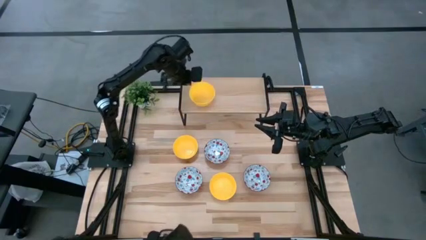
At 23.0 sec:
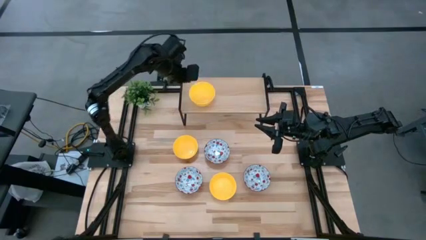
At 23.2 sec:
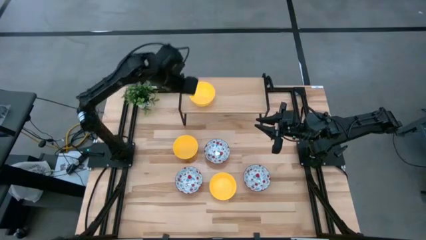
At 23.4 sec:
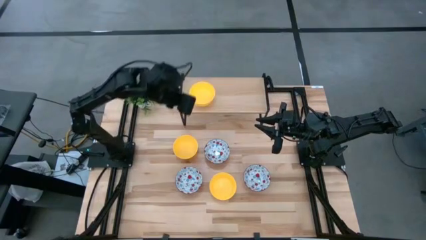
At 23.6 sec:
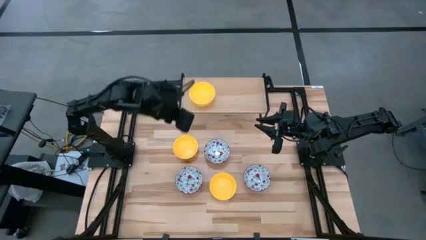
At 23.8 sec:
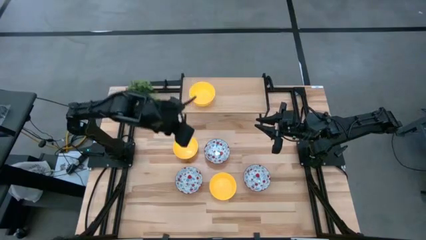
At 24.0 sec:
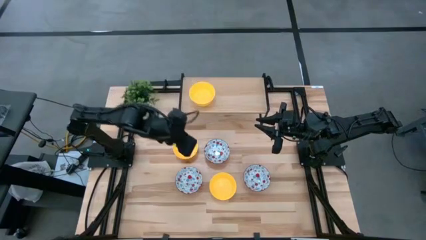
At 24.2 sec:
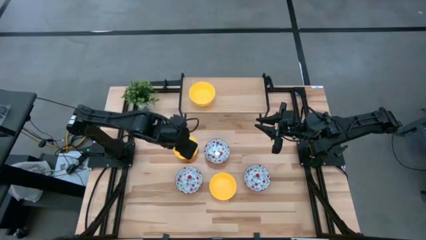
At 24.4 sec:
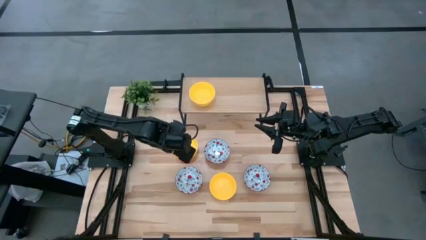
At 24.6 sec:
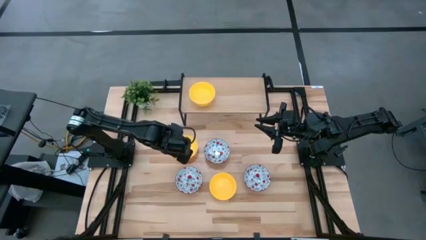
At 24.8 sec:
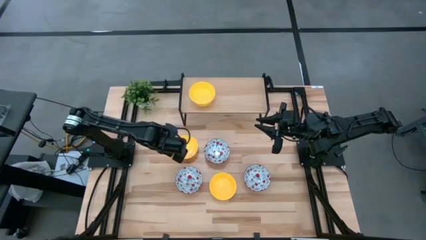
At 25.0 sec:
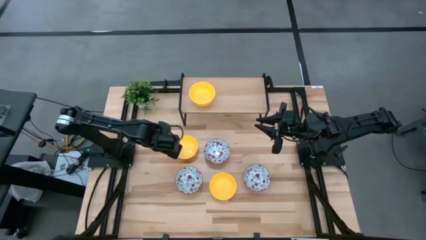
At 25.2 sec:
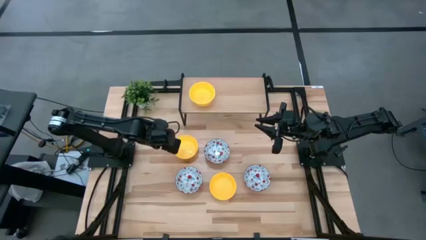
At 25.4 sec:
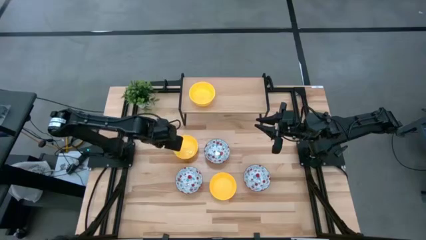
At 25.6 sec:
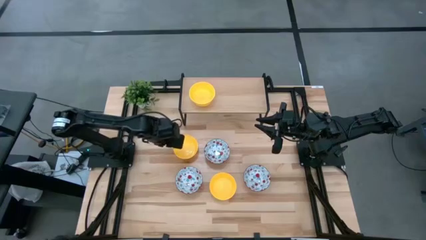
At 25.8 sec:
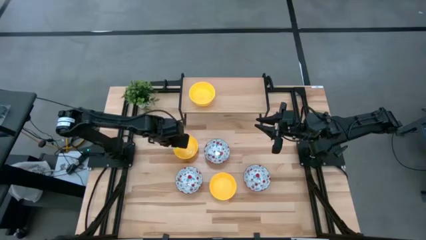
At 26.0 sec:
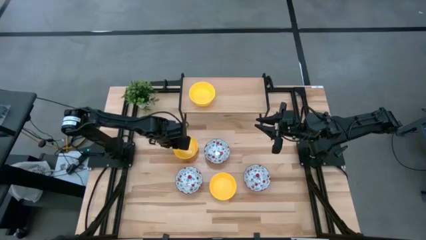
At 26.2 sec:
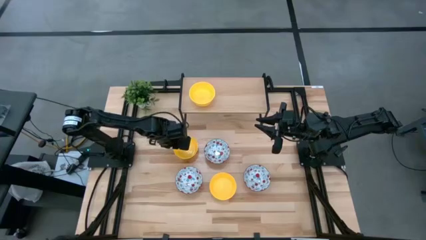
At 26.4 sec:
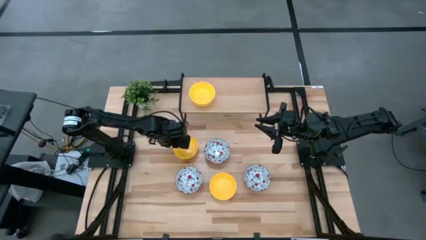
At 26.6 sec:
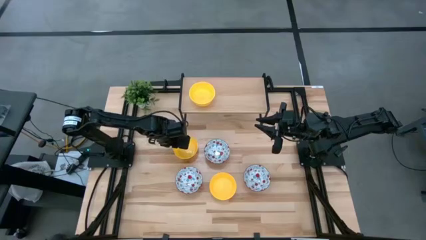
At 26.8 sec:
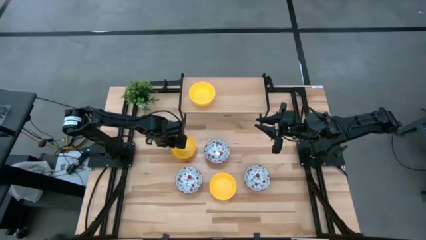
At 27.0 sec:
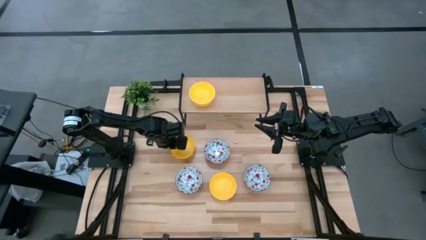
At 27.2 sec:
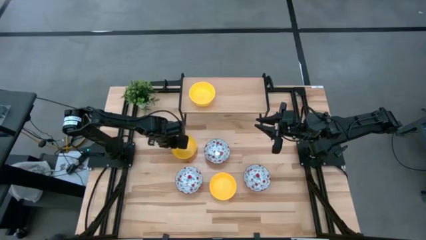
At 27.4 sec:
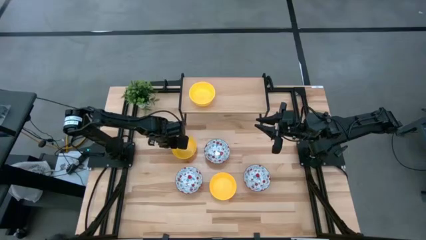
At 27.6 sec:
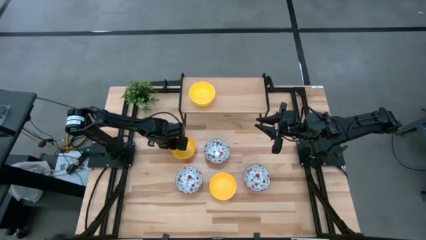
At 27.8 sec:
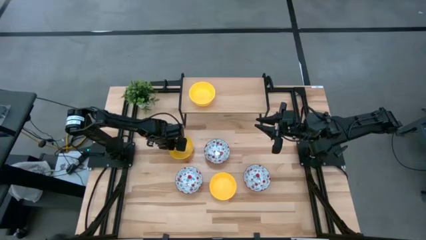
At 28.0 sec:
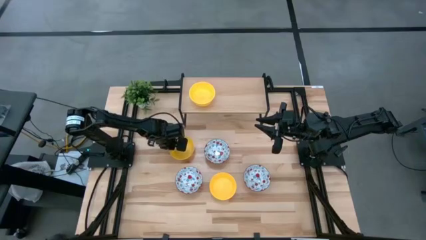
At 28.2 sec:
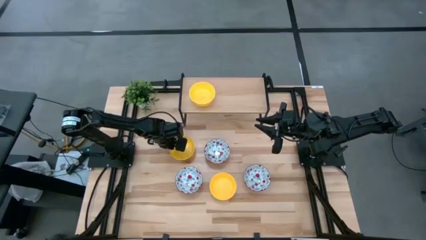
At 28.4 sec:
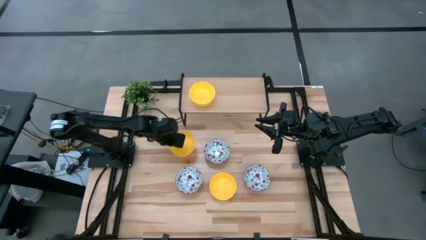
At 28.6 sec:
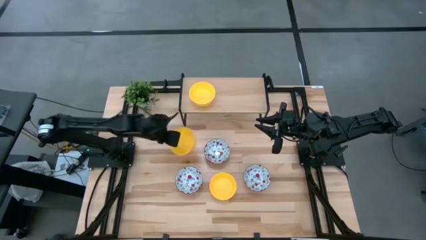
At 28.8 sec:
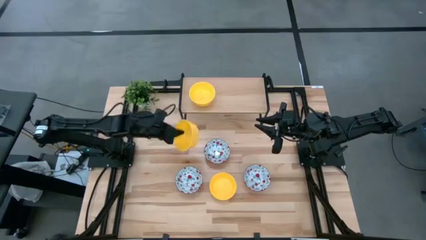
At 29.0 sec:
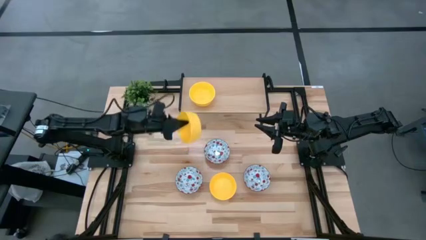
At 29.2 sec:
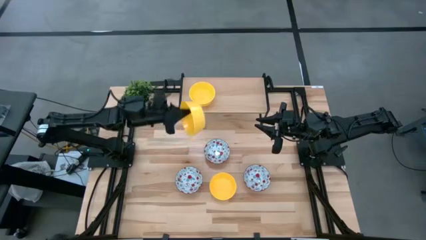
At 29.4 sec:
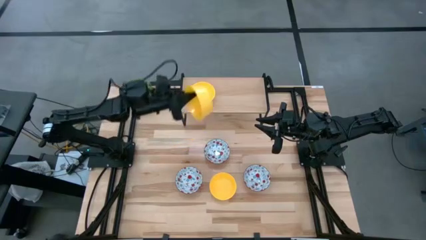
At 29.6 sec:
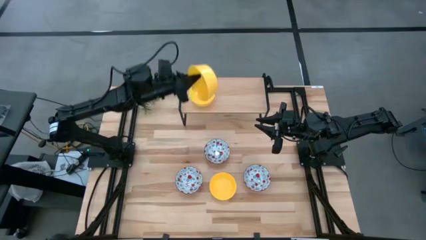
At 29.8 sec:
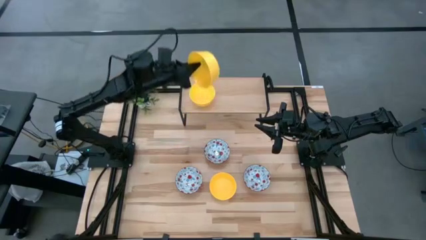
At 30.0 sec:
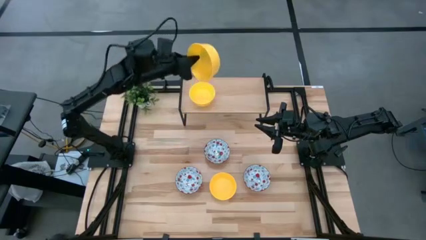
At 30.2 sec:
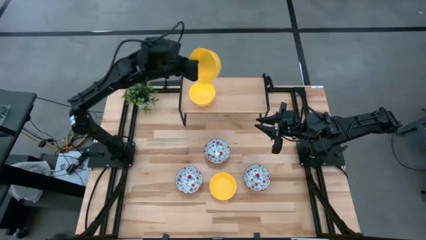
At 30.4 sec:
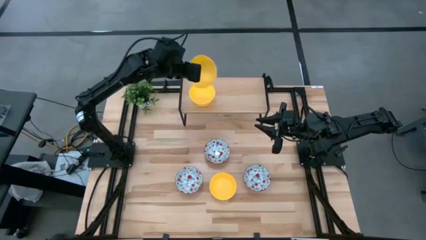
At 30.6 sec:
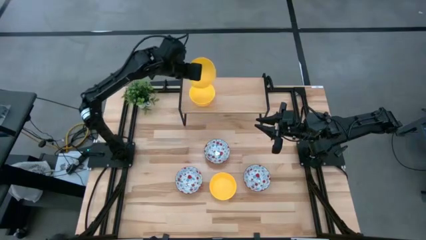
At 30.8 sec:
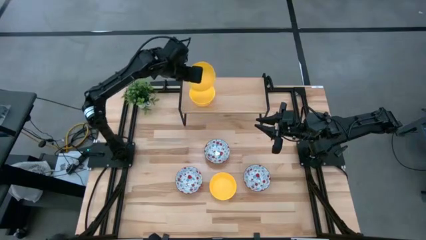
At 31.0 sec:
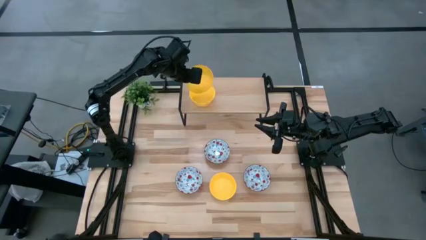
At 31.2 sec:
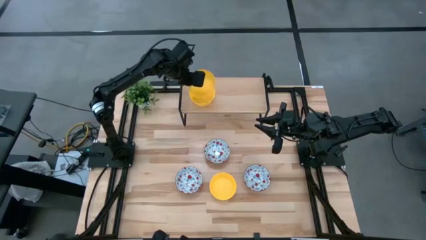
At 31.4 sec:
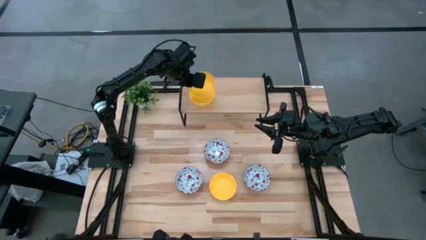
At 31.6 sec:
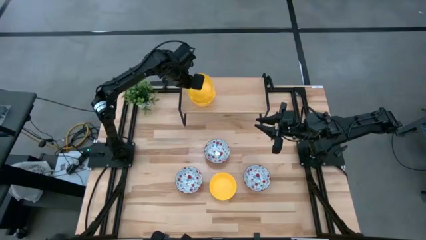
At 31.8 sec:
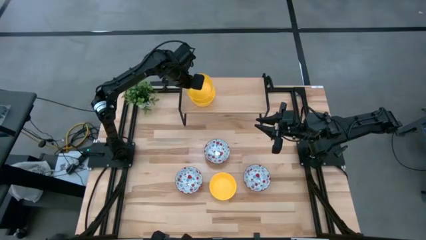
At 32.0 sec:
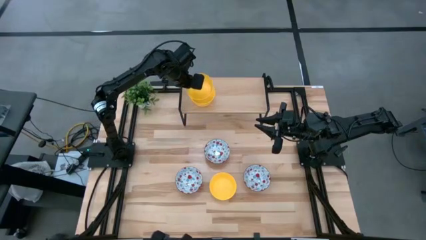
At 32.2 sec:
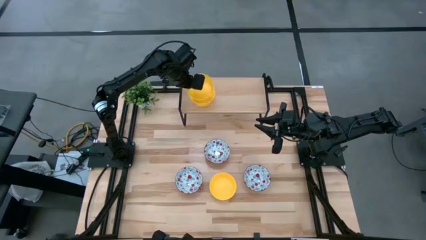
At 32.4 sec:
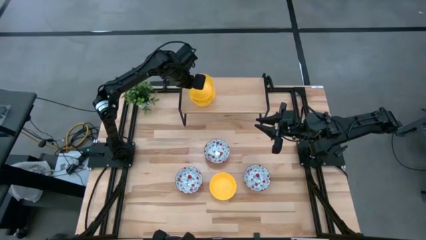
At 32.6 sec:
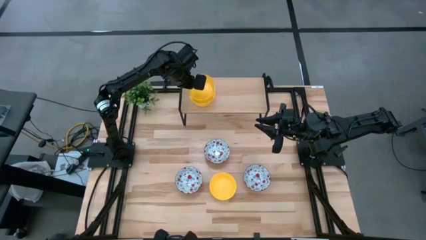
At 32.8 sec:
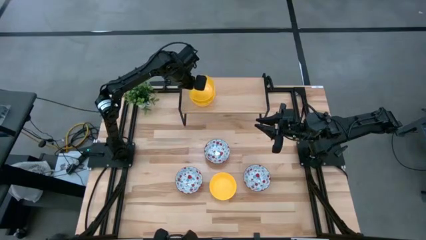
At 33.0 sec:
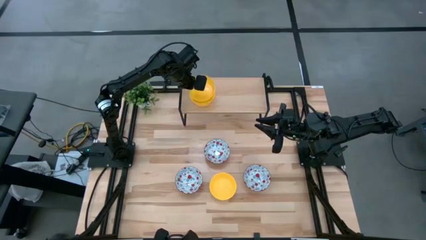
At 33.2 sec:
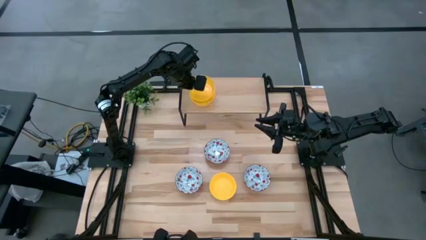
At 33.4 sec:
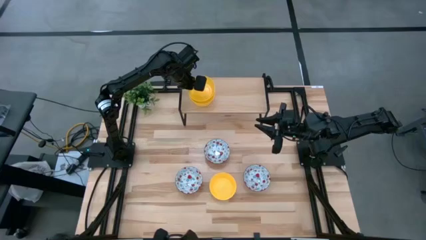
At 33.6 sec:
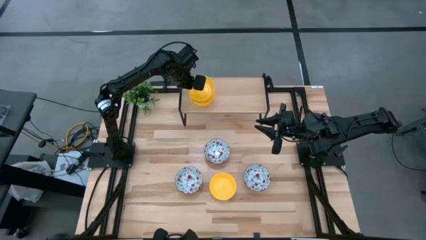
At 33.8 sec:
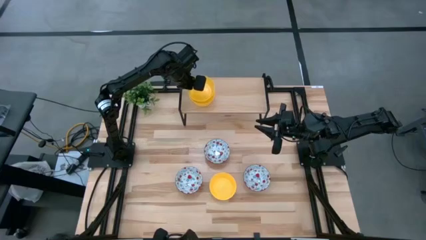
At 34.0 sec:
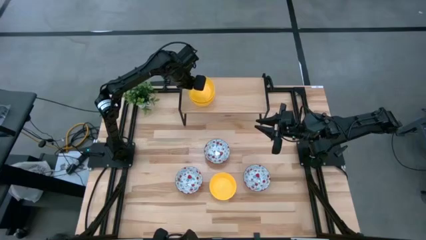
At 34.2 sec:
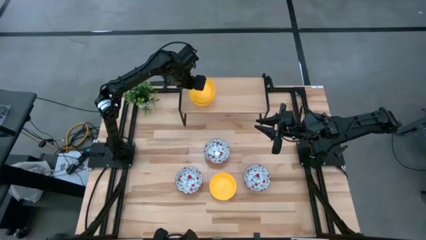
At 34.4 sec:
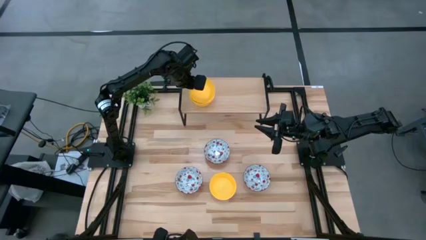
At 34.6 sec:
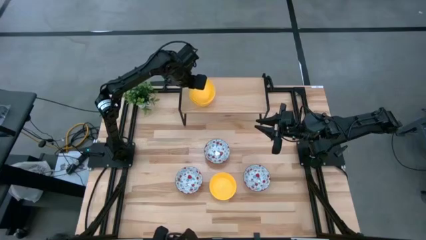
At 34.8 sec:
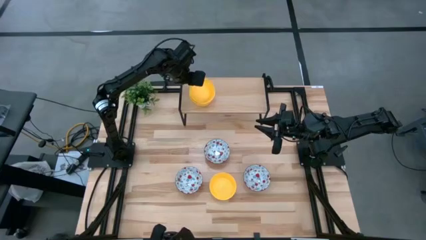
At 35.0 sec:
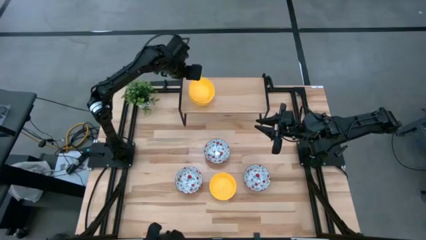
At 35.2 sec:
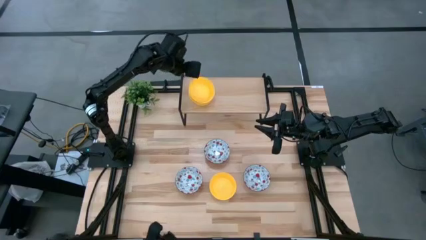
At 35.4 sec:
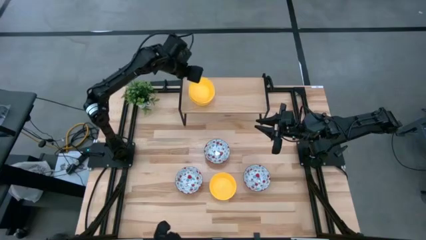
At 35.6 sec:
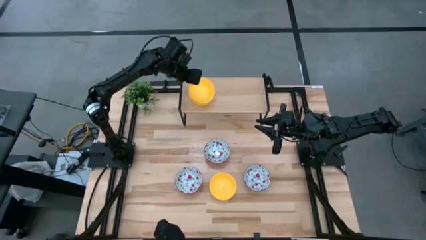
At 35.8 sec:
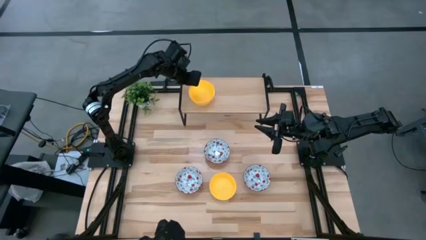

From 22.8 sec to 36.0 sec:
Task: Pick & Place Mini bowls
Stack the top yellow bowl on top of the yellow bowl on the shelf
